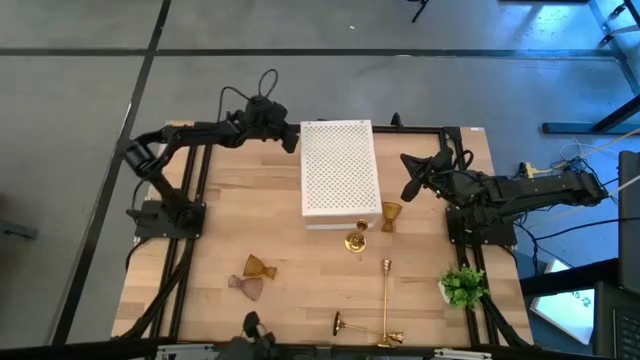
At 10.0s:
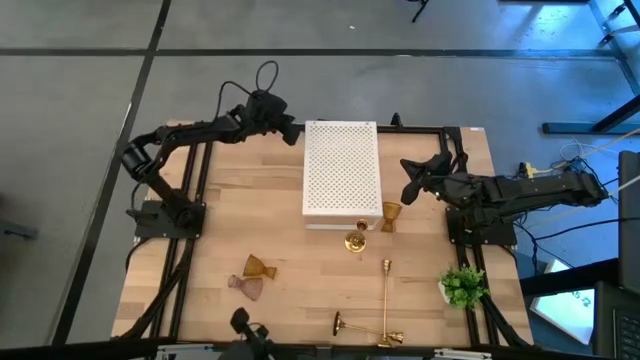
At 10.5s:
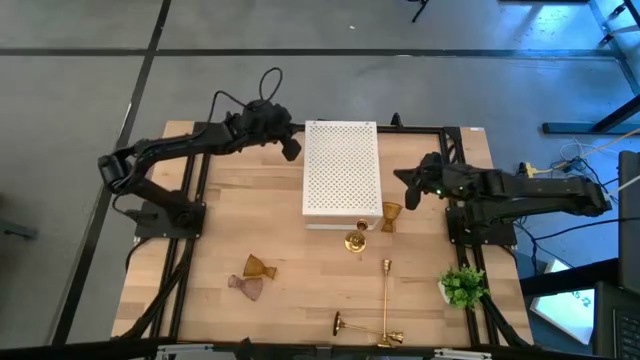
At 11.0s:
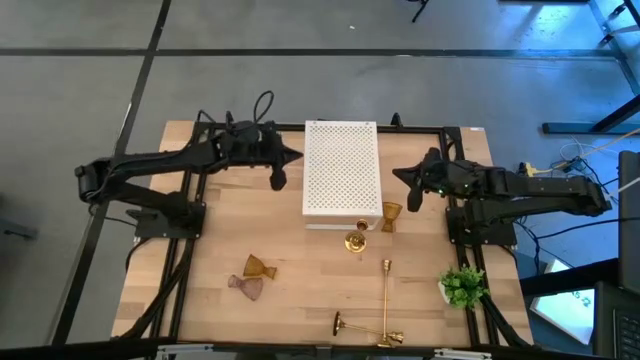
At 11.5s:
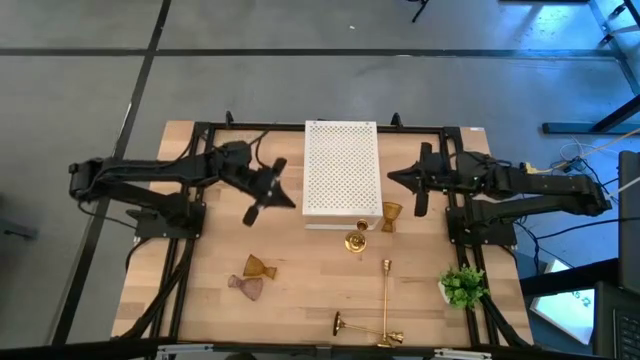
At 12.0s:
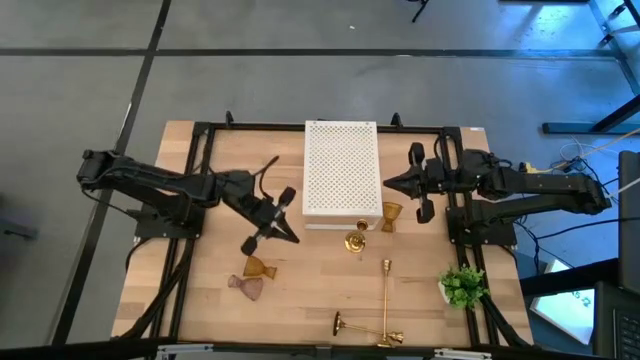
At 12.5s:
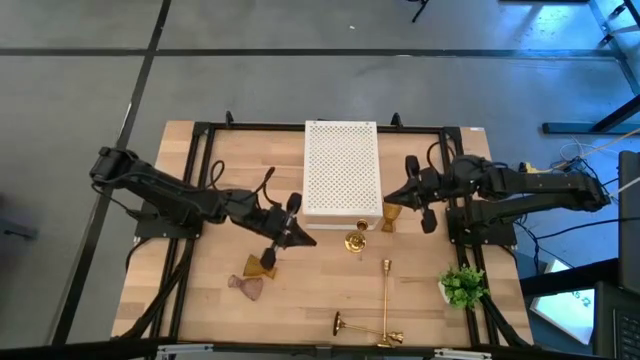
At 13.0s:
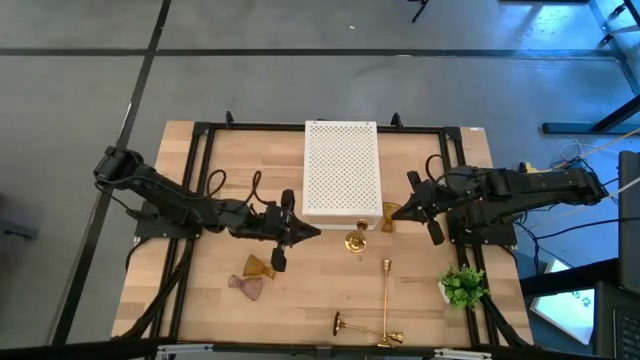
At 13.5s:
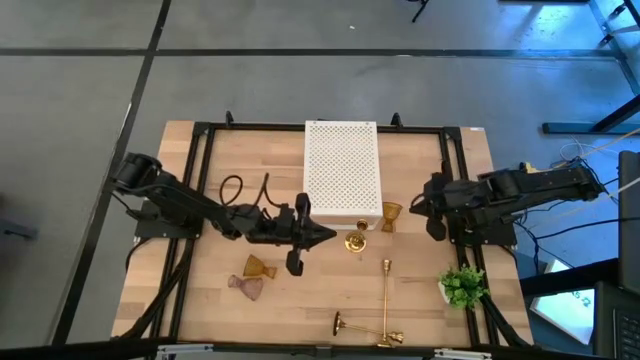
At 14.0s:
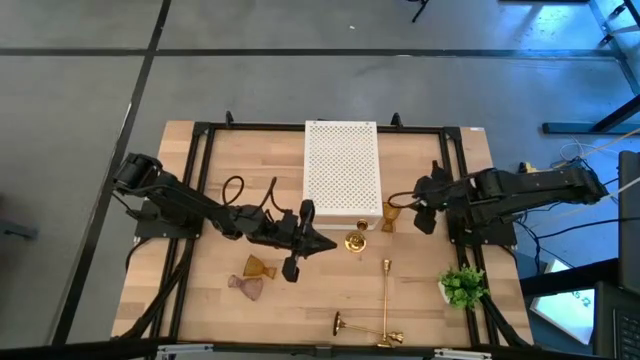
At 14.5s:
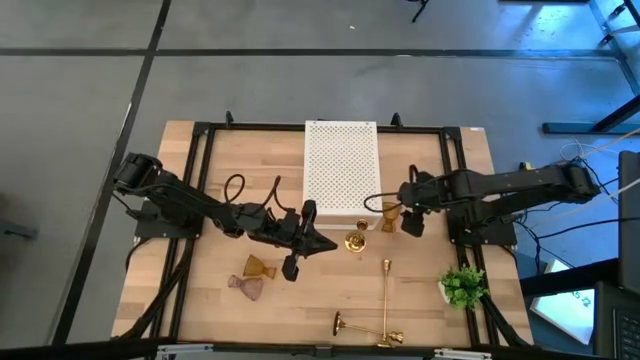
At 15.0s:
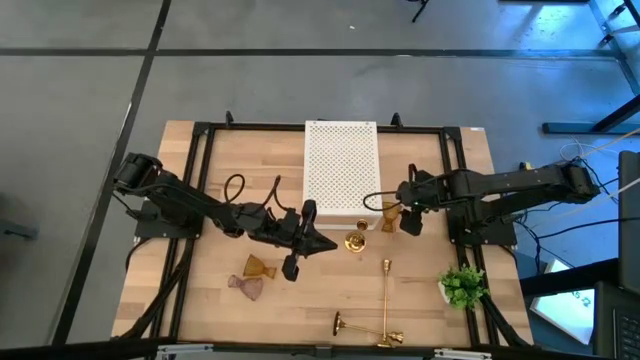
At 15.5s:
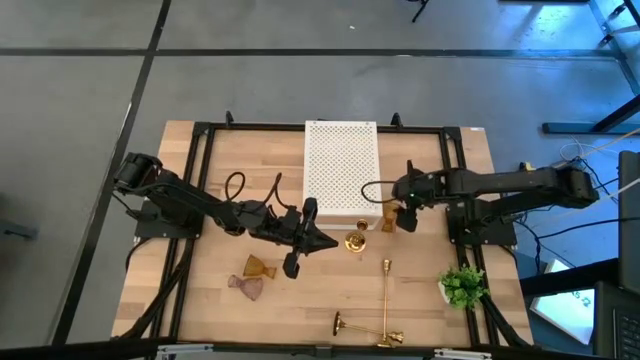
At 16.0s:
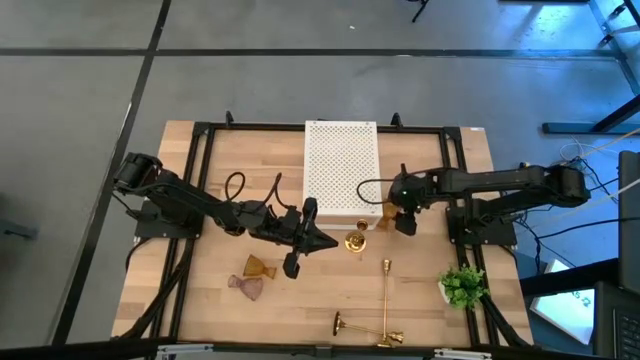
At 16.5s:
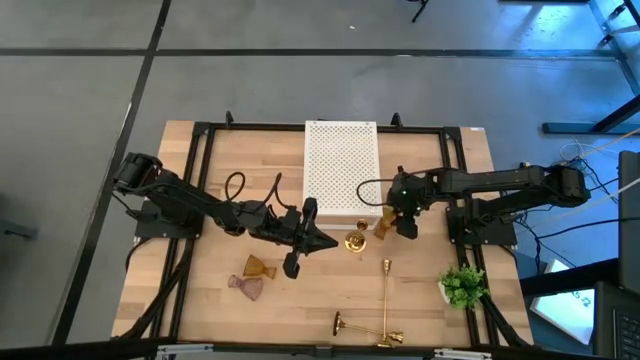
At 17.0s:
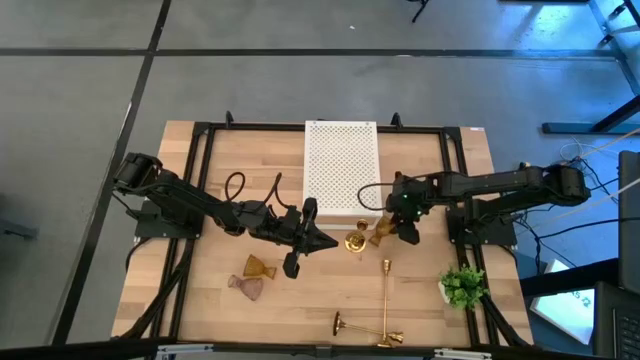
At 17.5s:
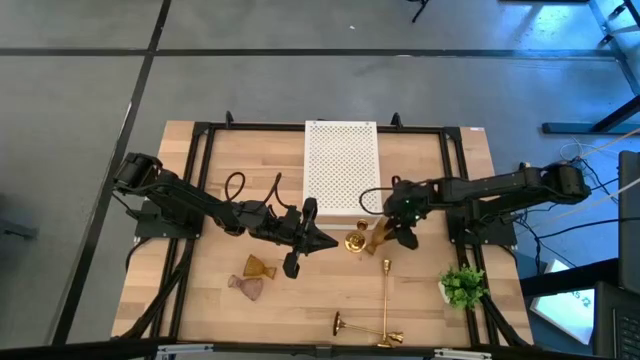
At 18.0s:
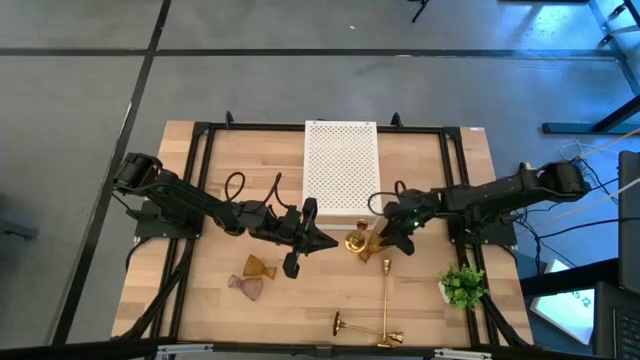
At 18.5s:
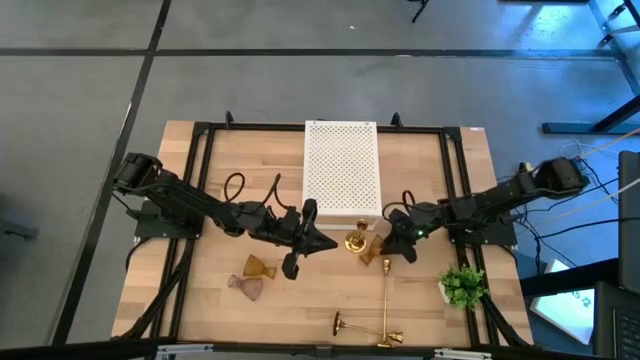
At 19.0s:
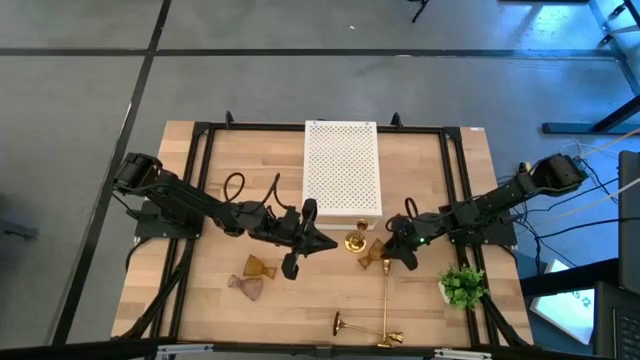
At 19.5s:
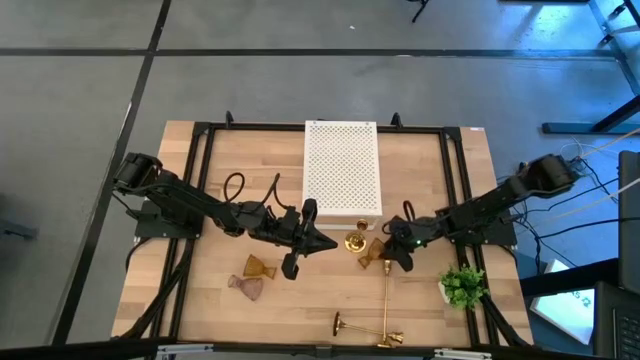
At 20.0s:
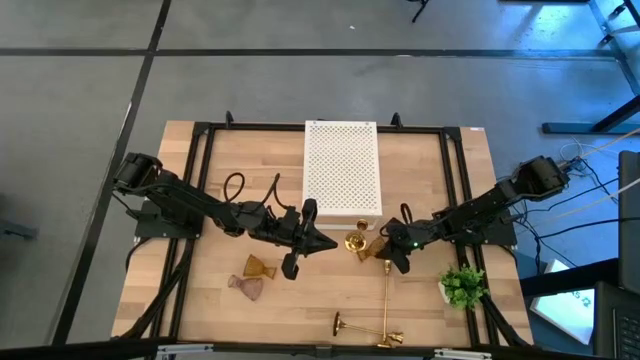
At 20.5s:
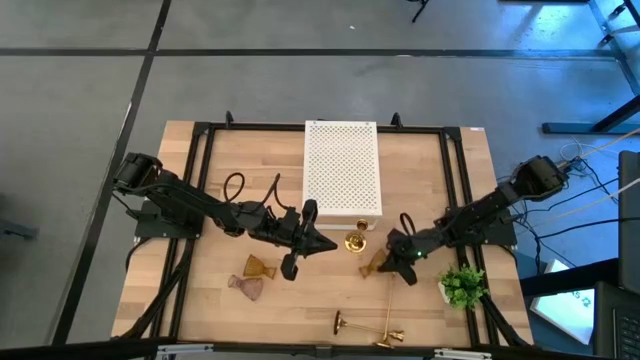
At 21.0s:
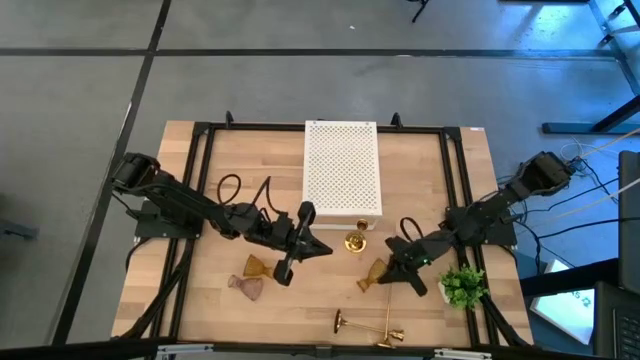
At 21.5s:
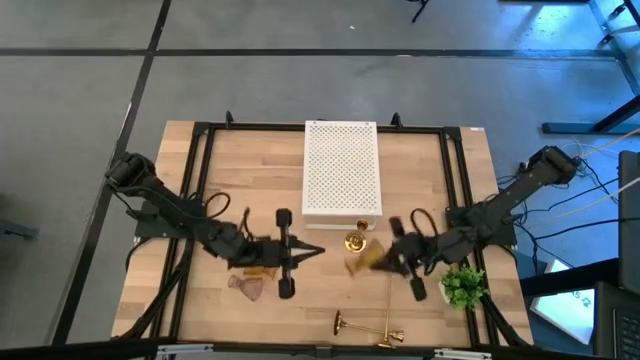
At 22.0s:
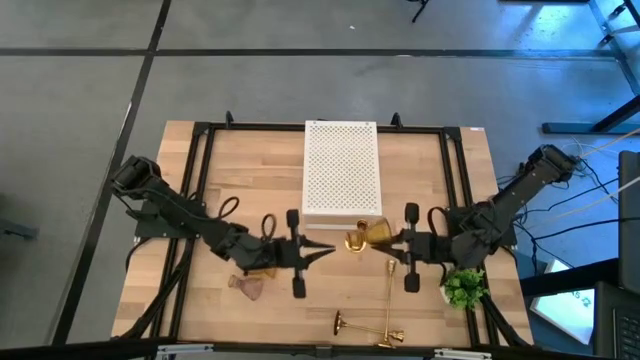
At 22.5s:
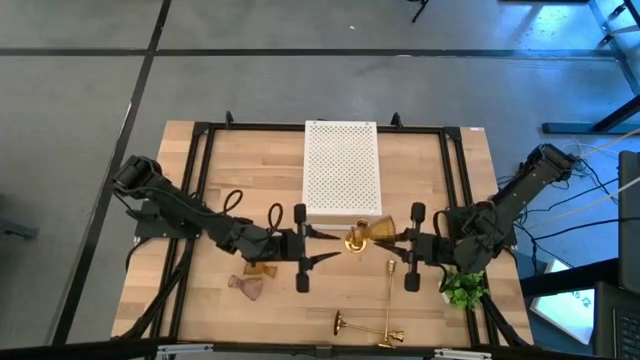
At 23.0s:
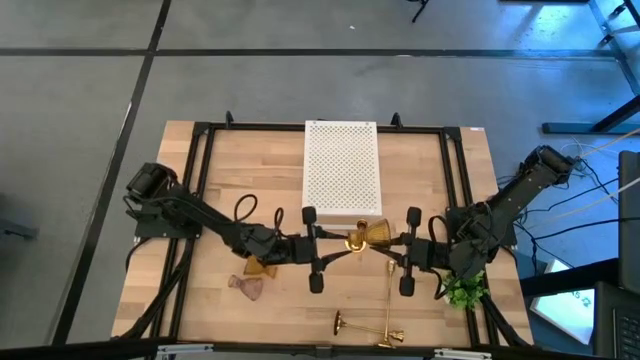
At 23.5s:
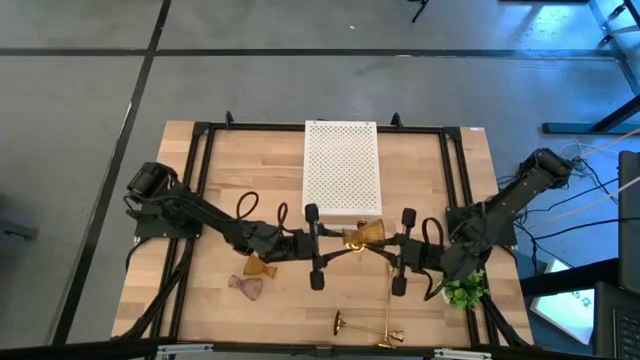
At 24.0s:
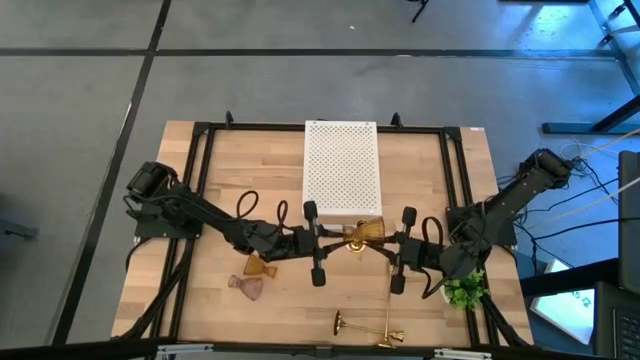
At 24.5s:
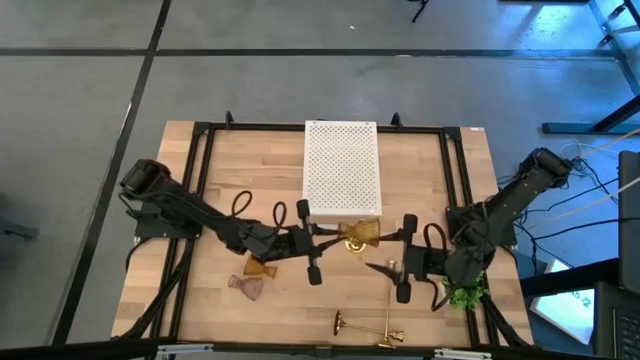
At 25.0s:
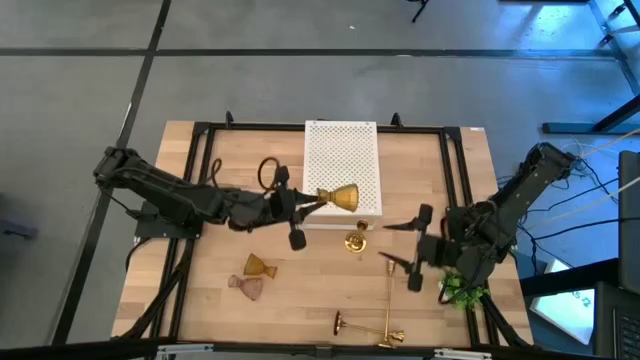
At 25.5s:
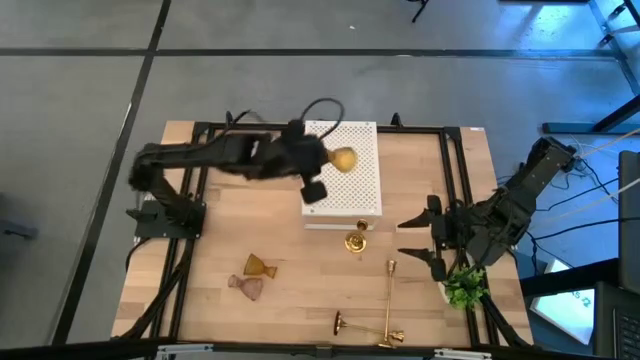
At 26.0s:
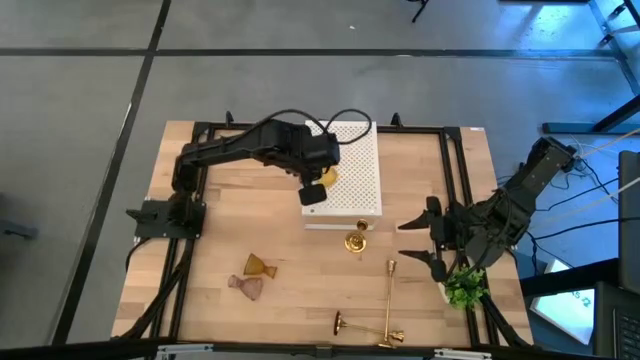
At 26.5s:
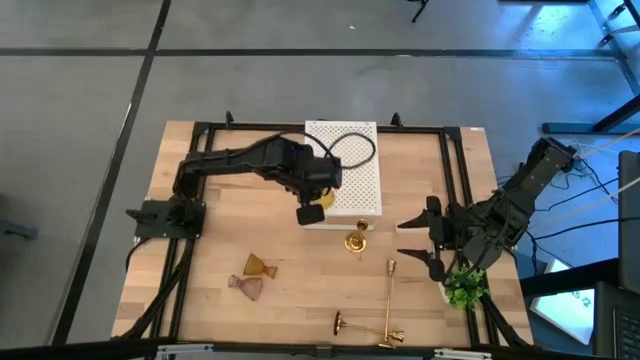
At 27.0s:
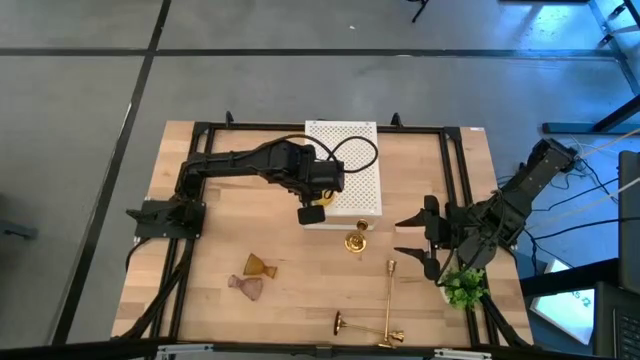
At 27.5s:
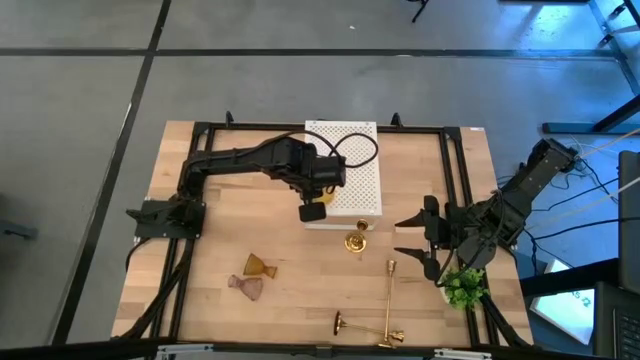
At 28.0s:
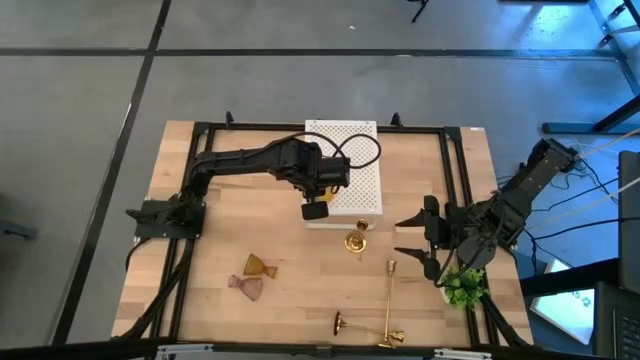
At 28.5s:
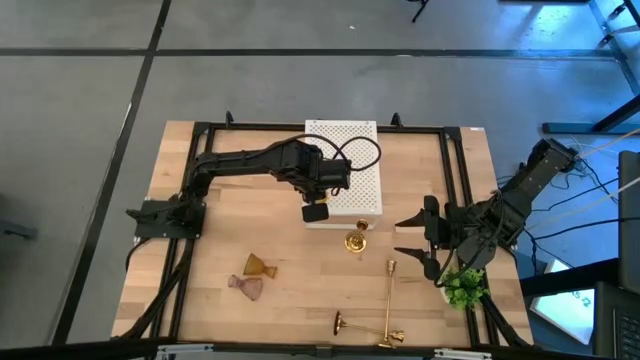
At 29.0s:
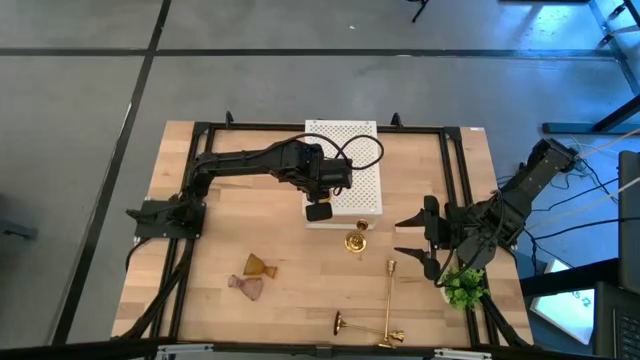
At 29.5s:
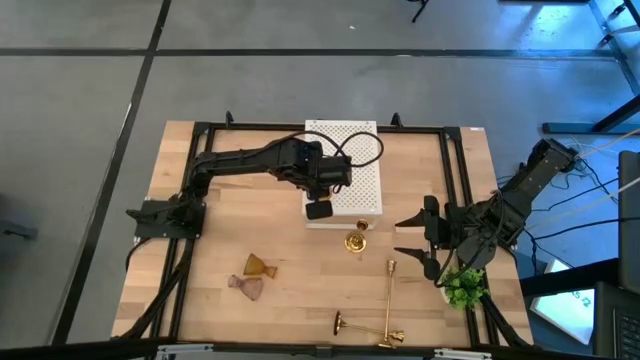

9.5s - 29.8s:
Task: Pick & Place candle stick holders
Put the top yellow candle holder on the shelf
